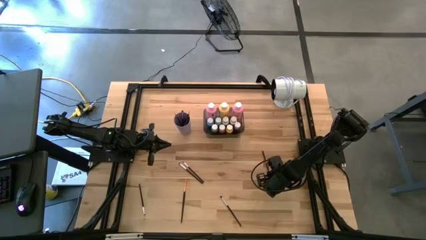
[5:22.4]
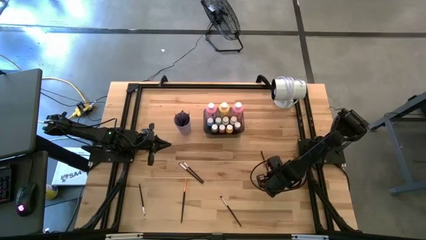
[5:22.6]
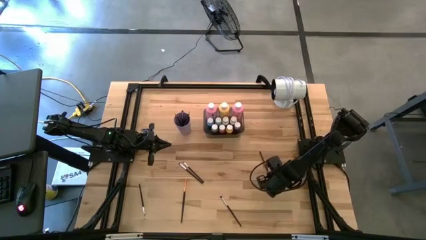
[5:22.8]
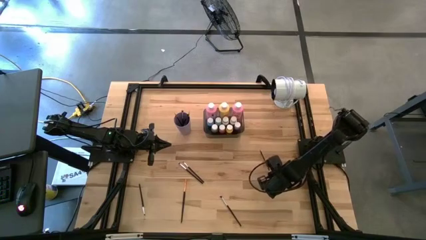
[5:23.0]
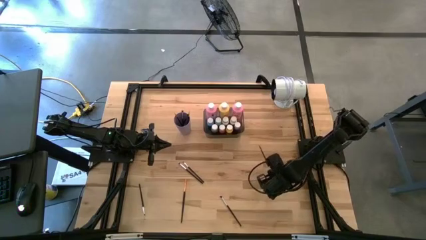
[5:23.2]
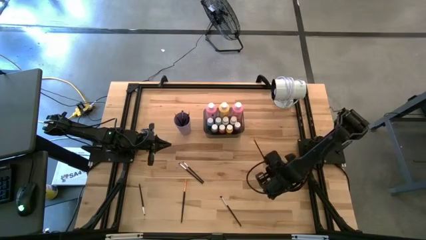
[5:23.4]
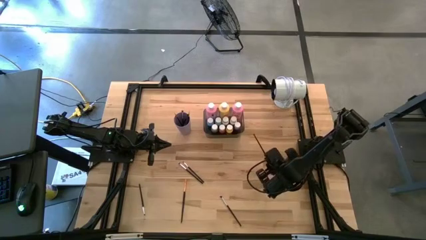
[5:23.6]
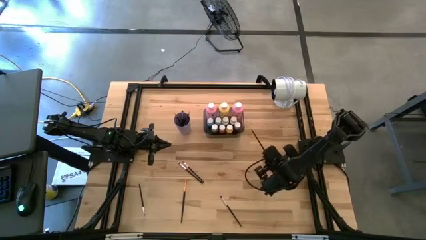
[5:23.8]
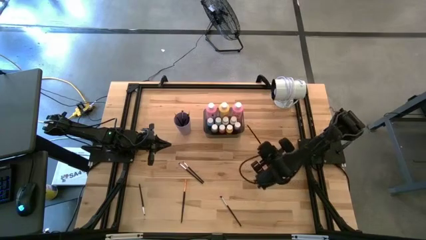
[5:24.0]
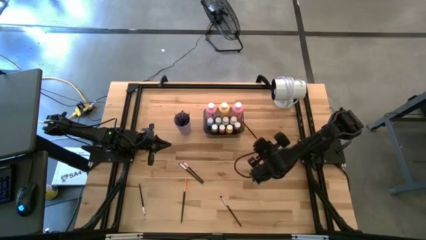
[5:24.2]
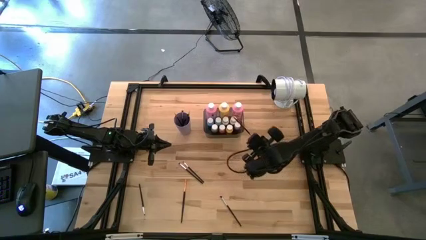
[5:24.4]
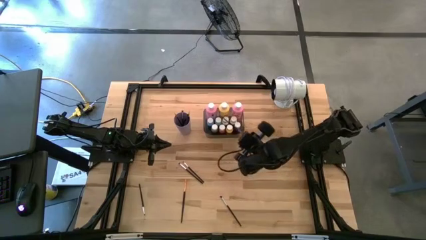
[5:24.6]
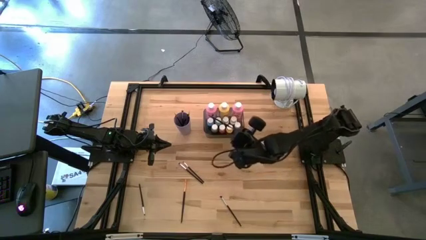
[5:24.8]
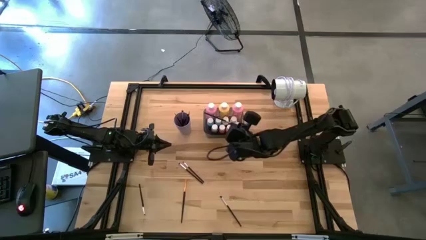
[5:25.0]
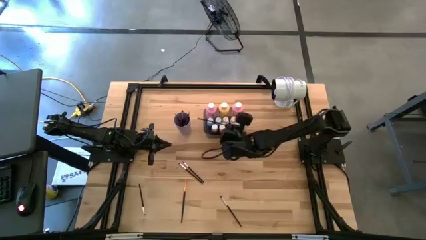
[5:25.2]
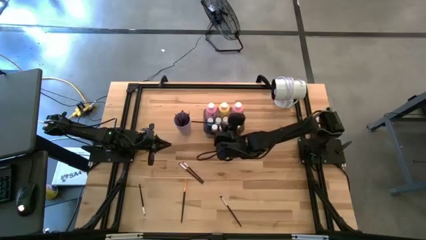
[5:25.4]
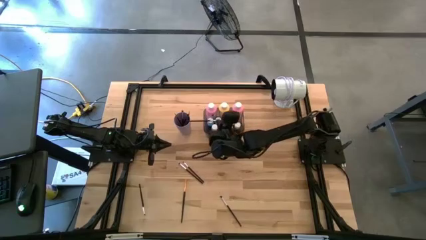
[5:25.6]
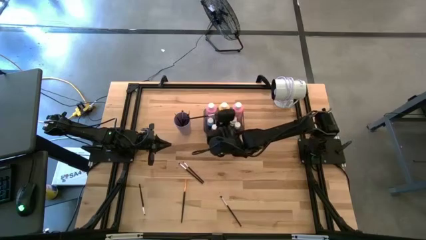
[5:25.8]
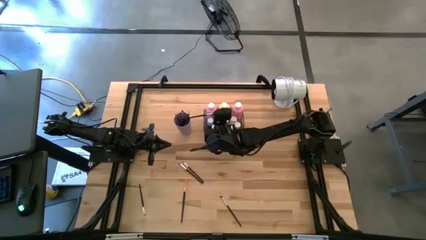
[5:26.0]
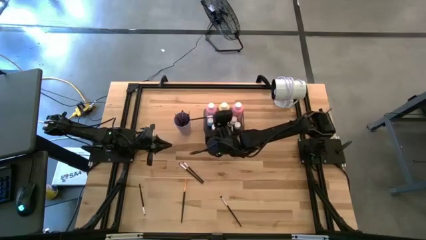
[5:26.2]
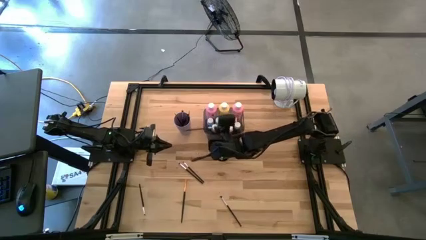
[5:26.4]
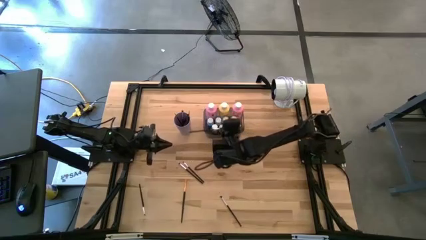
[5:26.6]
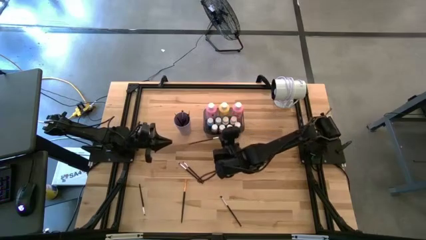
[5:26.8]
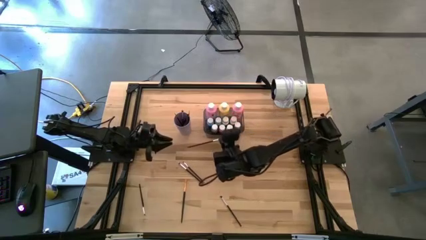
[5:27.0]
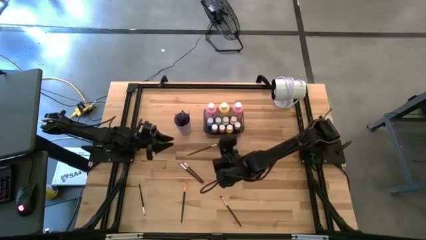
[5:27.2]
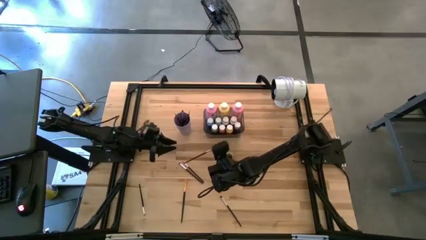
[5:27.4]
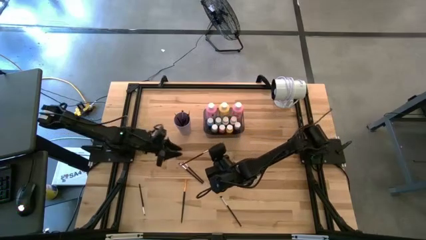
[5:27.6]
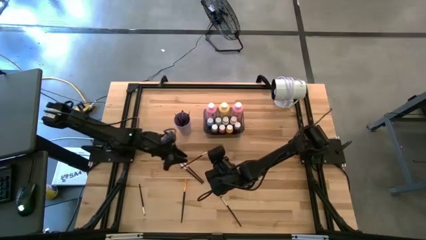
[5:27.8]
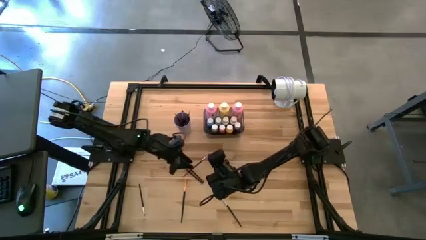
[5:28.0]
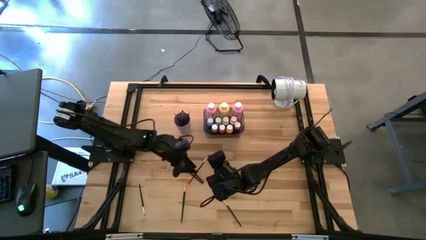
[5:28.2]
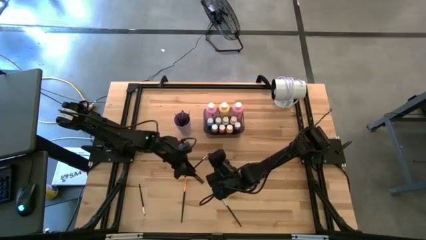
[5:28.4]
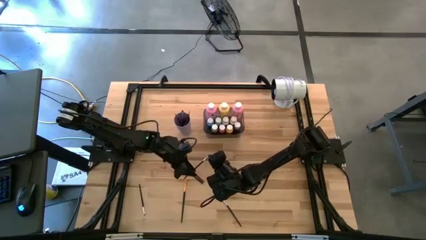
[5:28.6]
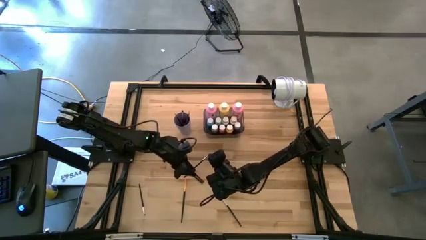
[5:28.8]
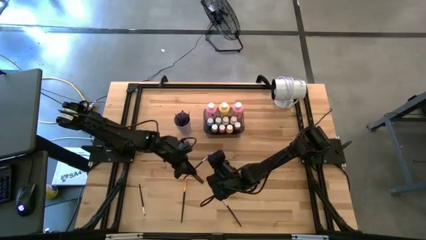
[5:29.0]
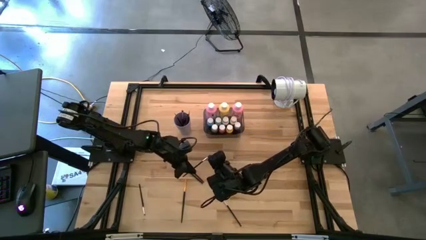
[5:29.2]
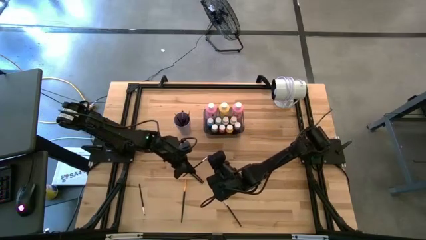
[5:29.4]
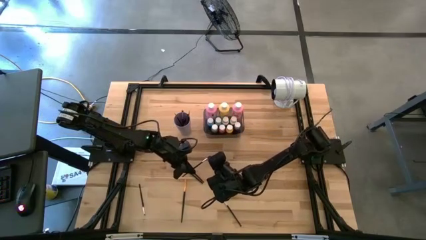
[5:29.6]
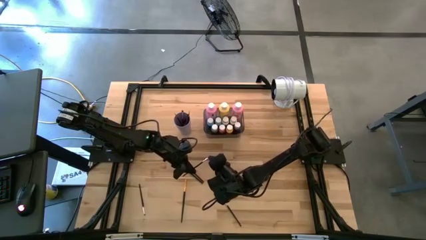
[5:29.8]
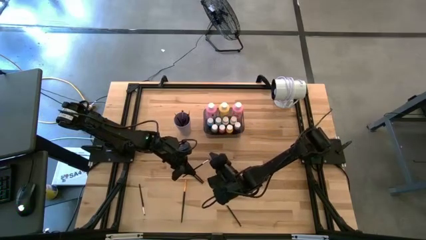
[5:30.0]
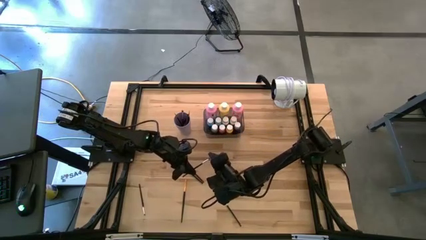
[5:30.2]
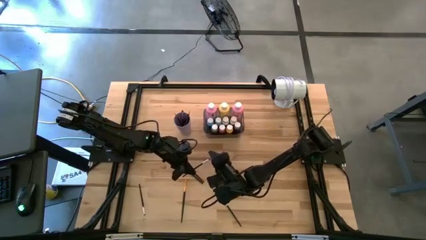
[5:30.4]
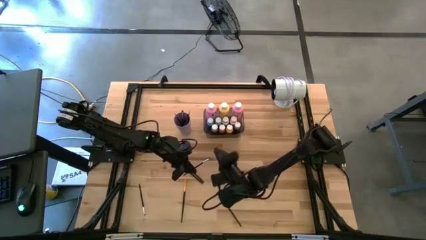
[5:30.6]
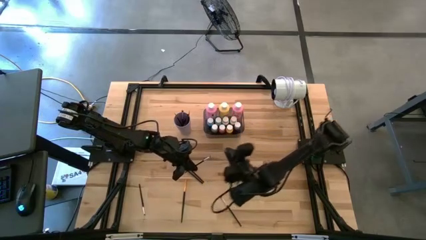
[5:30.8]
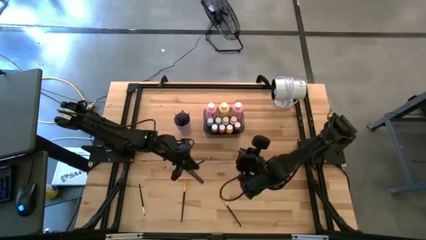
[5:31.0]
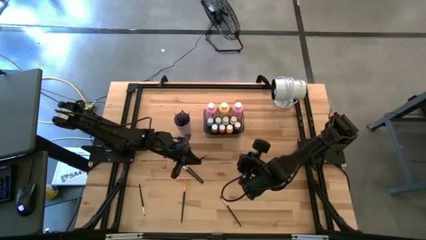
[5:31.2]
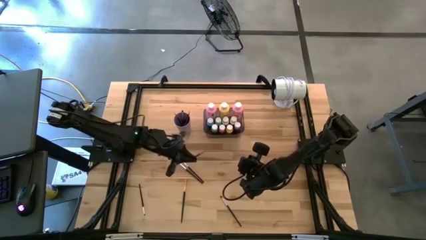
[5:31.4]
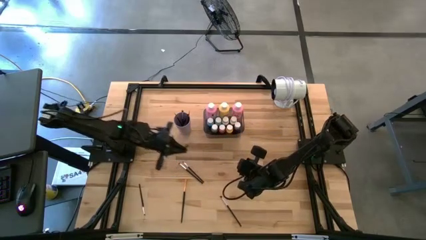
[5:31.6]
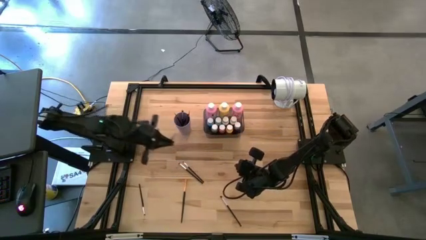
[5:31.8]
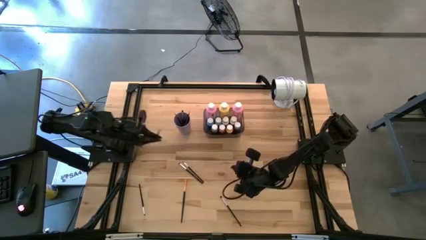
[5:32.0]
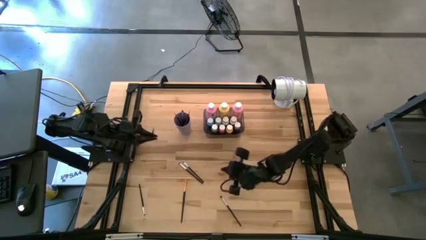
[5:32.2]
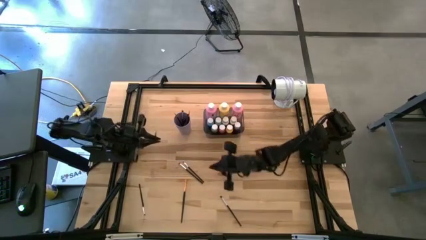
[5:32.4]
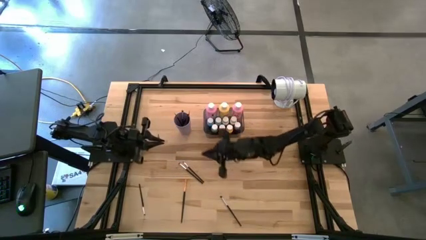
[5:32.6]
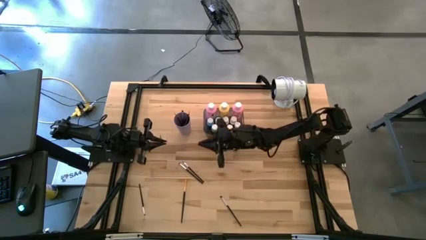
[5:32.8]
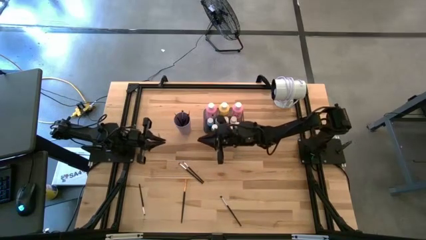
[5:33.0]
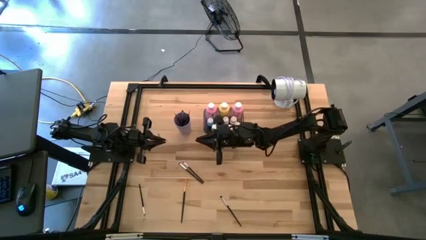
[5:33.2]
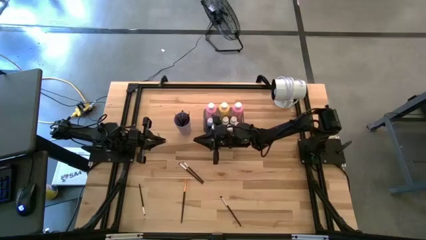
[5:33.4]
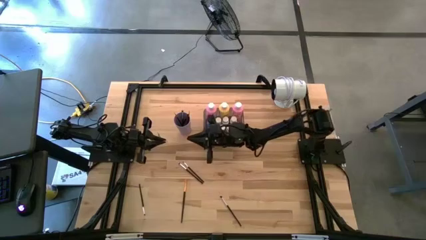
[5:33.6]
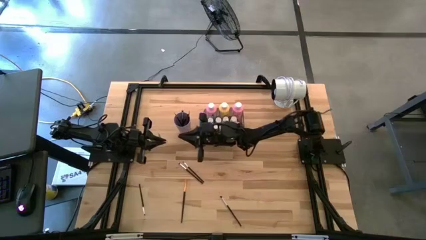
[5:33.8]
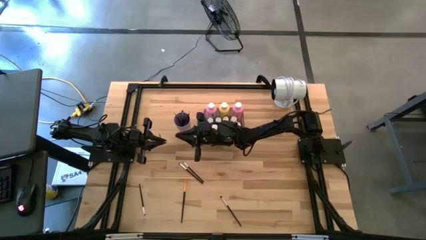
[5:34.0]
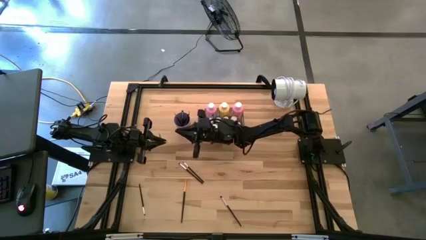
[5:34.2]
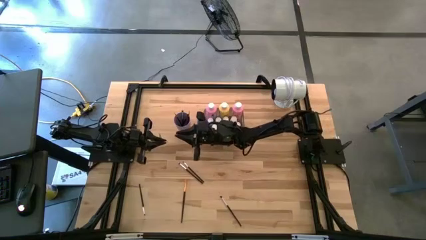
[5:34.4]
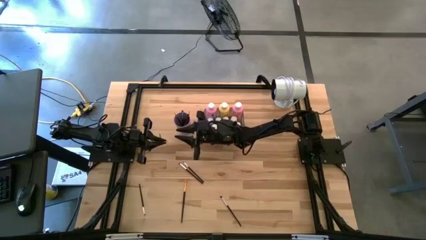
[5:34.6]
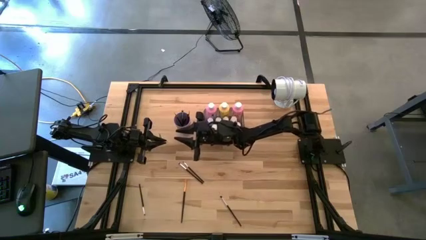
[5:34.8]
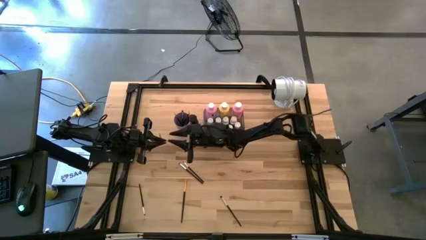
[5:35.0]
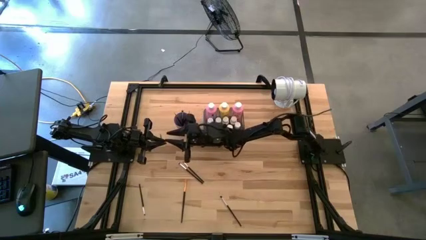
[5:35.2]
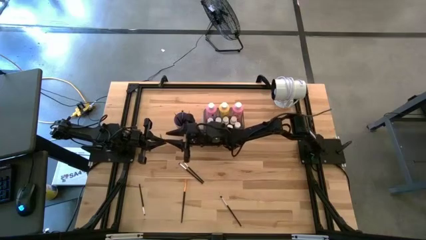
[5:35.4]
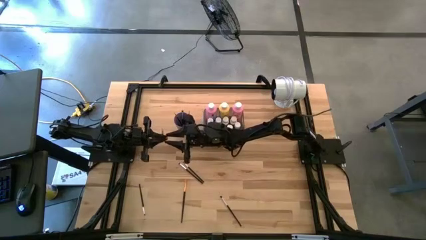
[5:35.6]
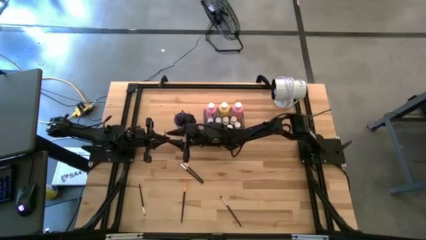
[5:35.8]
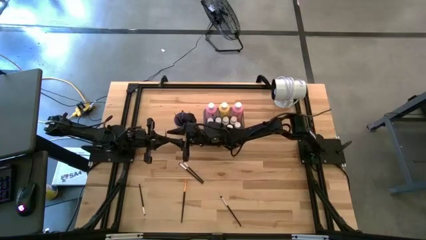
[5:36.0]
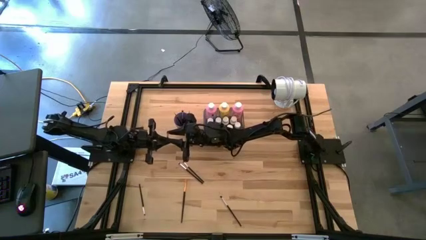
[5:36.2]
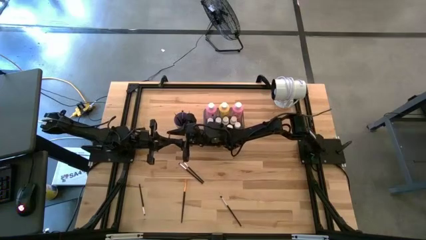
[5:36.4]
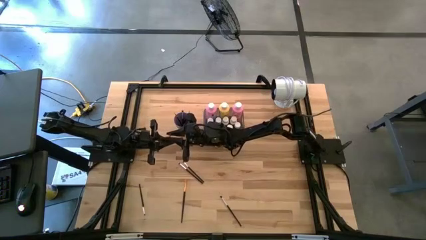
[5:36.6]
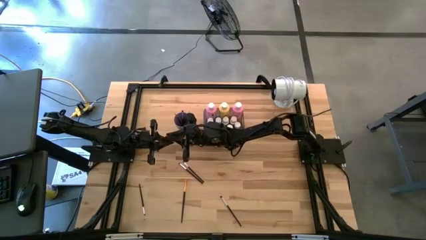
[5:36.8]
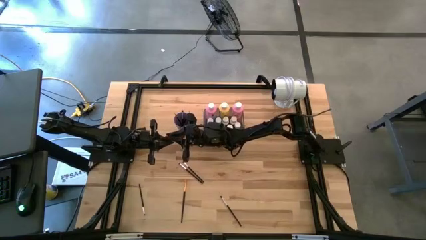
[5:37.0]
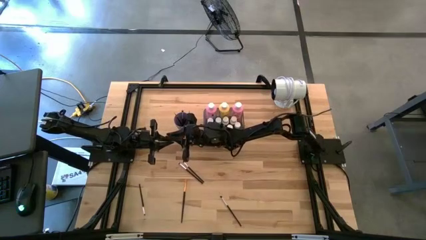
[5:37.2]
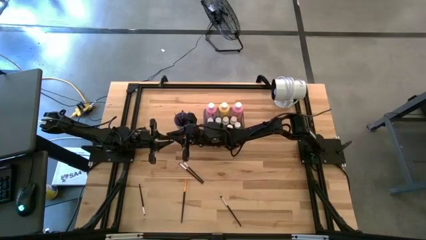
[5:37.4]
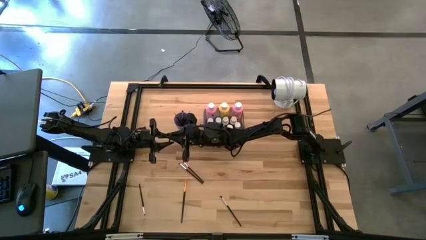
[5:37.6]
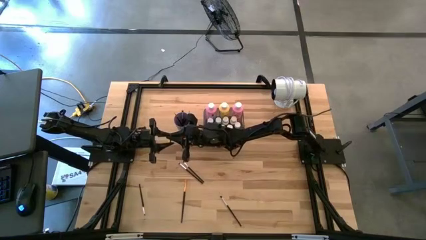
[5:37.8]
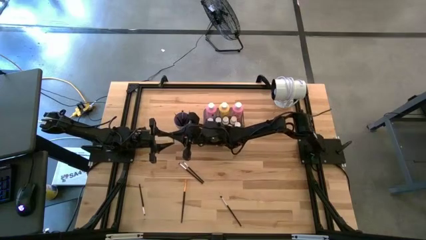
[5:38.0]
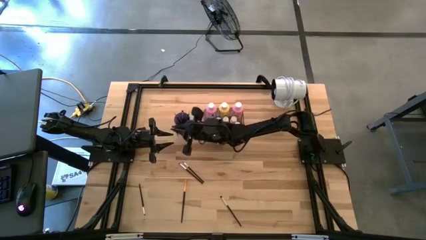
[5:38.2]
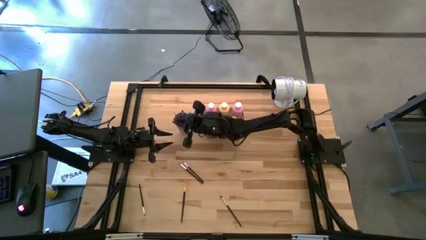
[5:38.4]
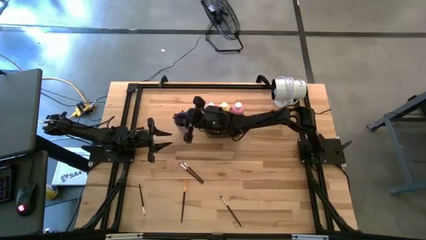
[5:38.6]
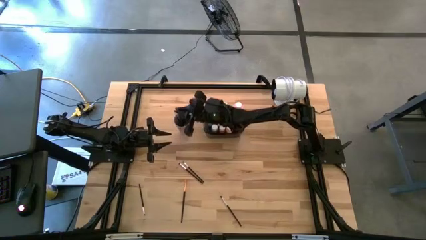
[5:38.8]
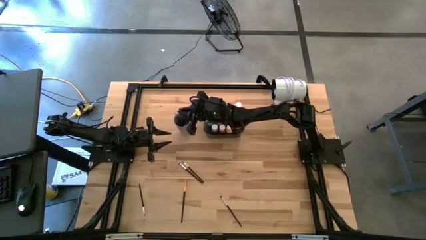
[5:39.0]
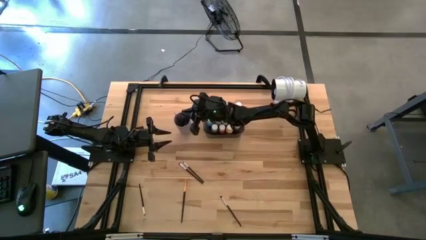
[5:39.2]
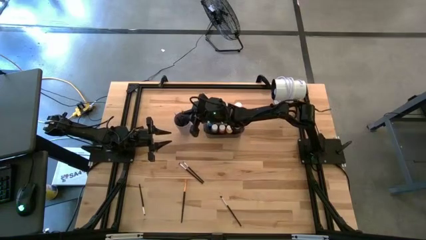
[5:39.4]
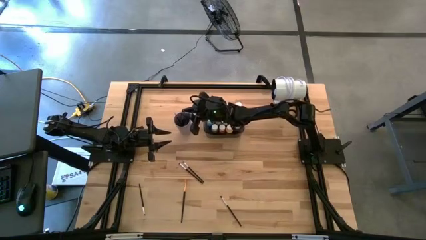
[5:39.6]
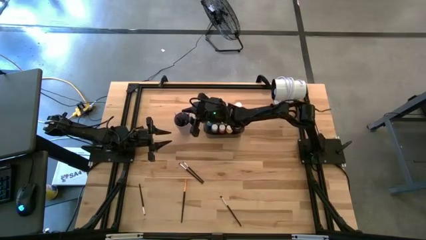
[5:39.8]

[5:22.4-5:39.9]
Task: Pick & Place Paint Supplies
Put the silver paint brush into the purple cup
